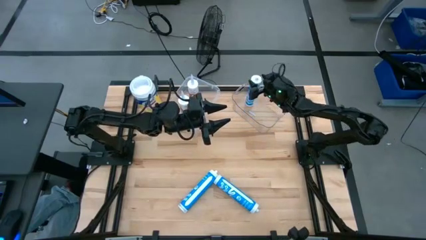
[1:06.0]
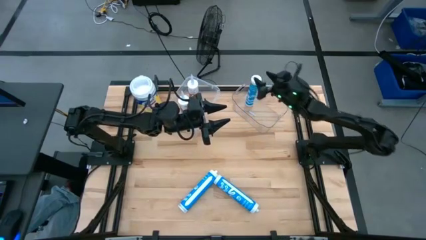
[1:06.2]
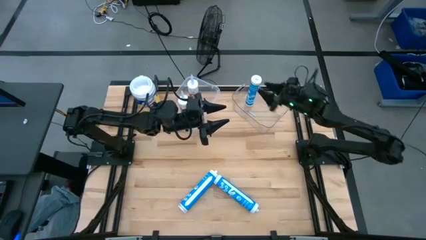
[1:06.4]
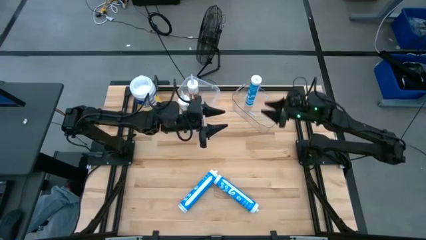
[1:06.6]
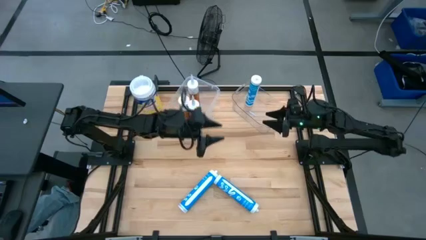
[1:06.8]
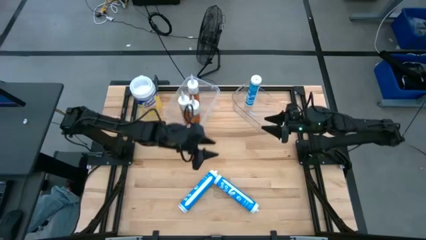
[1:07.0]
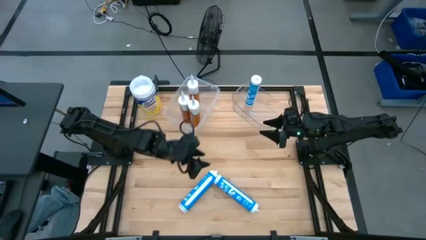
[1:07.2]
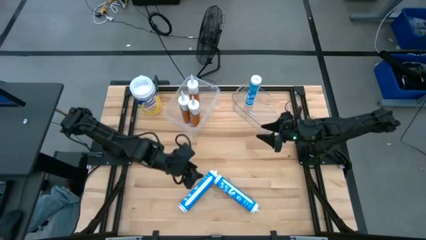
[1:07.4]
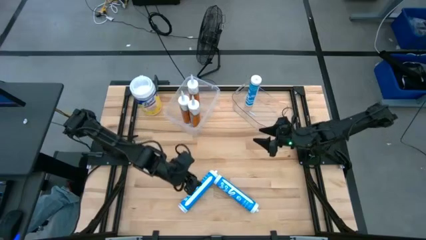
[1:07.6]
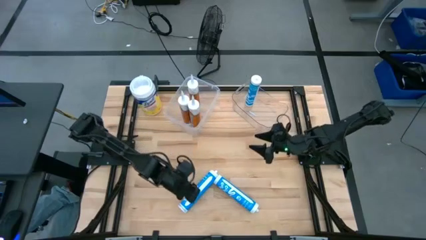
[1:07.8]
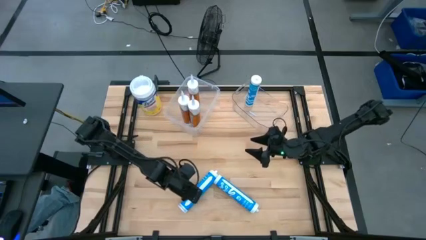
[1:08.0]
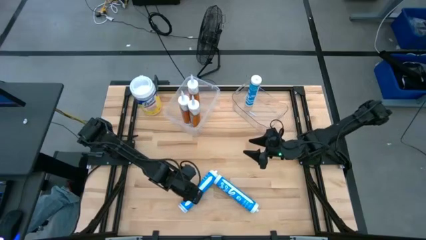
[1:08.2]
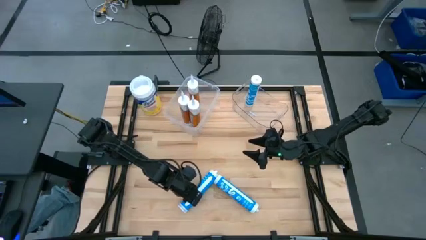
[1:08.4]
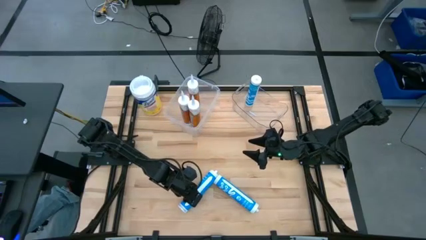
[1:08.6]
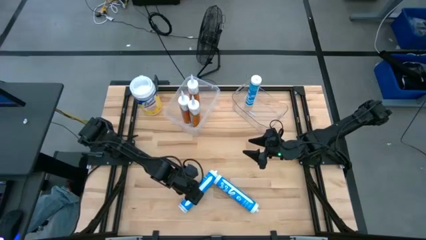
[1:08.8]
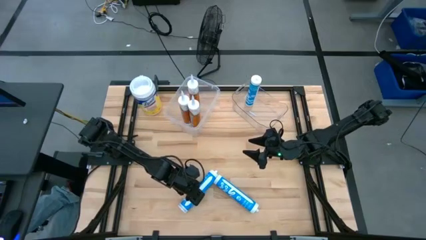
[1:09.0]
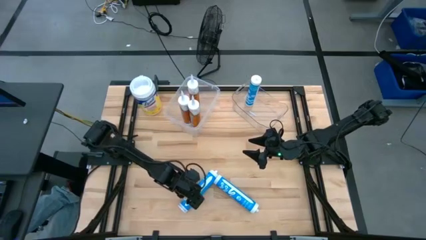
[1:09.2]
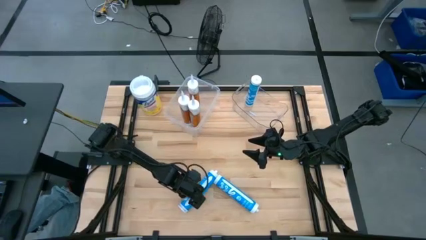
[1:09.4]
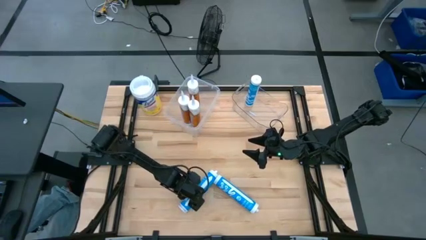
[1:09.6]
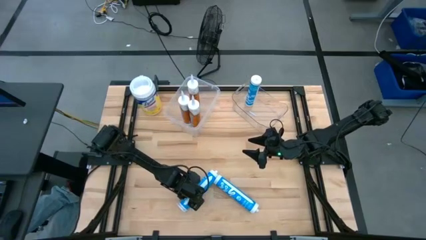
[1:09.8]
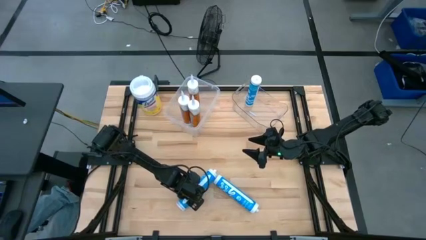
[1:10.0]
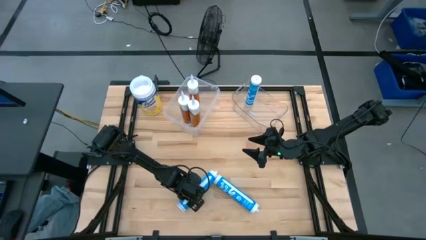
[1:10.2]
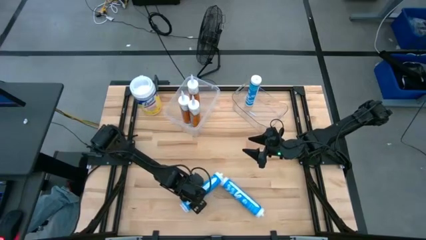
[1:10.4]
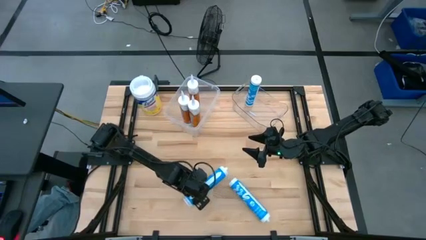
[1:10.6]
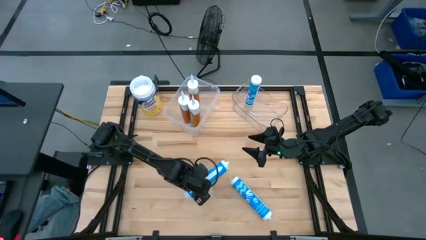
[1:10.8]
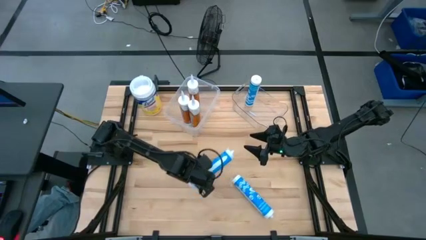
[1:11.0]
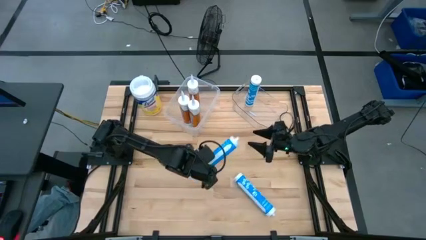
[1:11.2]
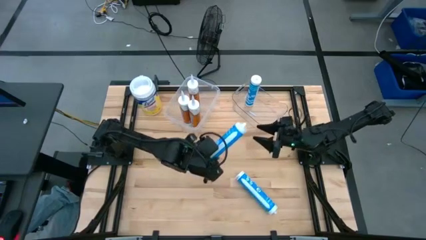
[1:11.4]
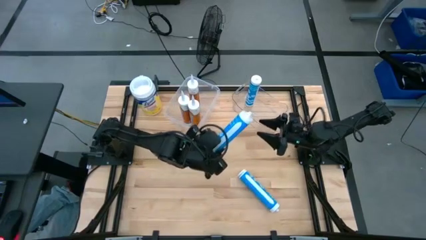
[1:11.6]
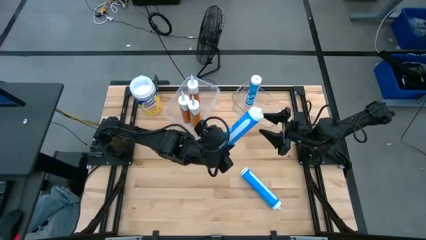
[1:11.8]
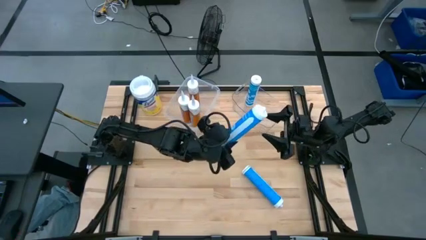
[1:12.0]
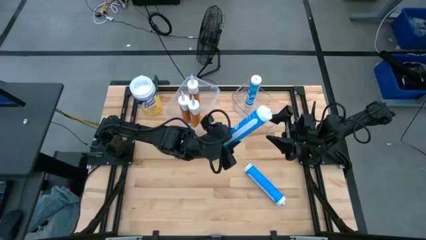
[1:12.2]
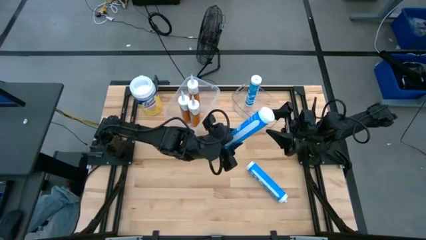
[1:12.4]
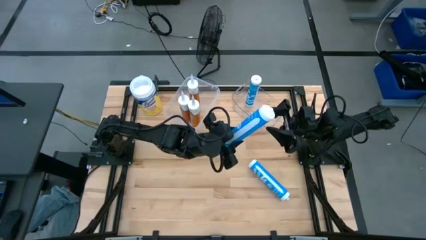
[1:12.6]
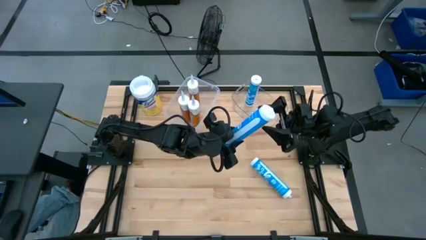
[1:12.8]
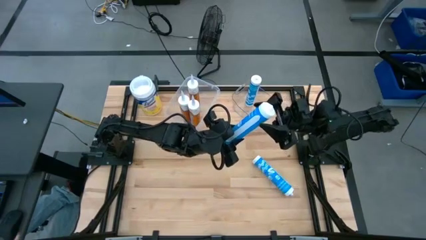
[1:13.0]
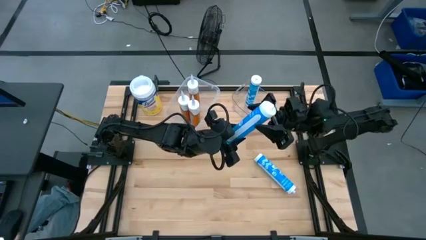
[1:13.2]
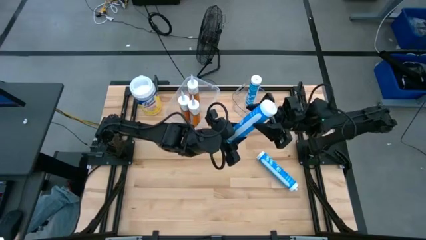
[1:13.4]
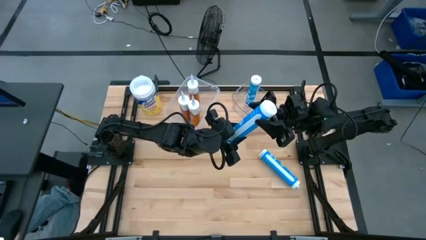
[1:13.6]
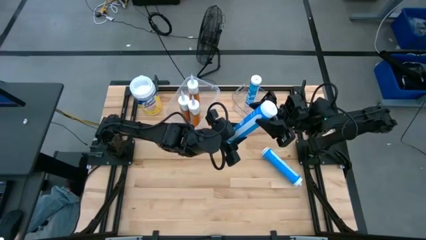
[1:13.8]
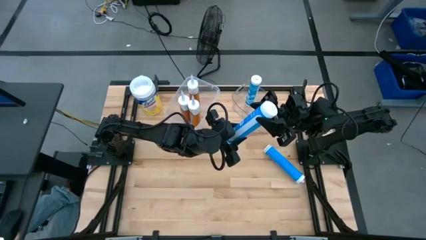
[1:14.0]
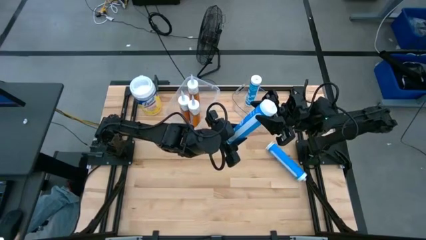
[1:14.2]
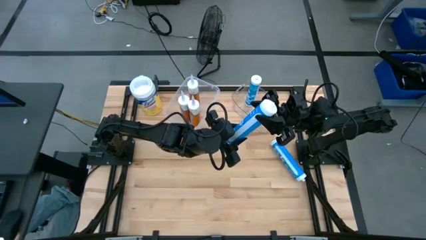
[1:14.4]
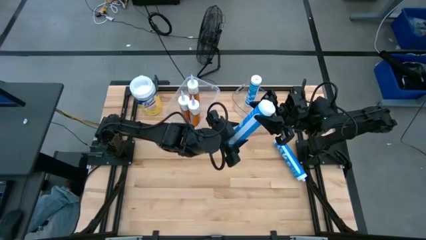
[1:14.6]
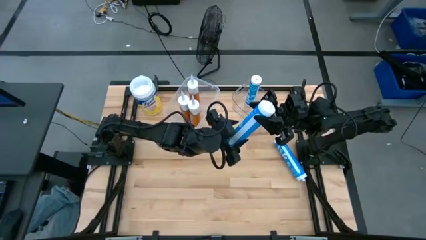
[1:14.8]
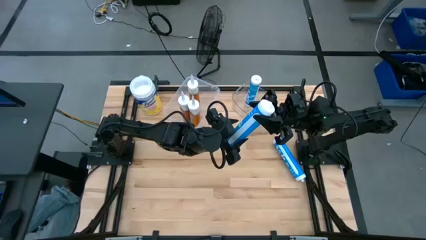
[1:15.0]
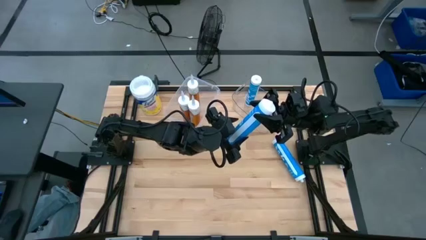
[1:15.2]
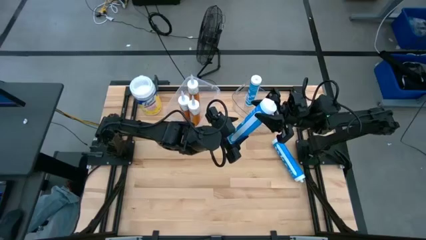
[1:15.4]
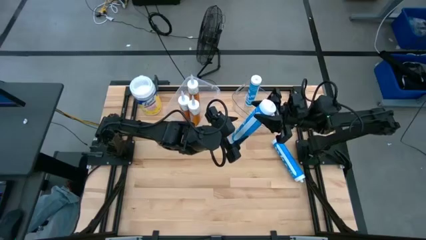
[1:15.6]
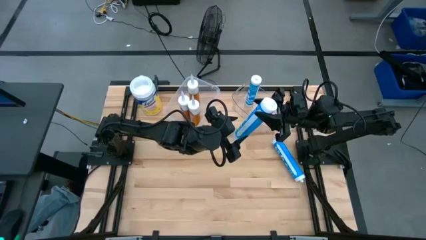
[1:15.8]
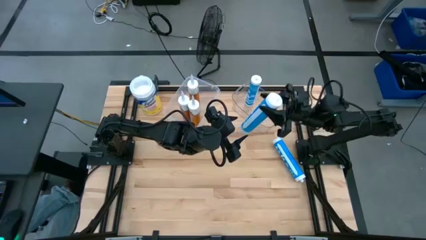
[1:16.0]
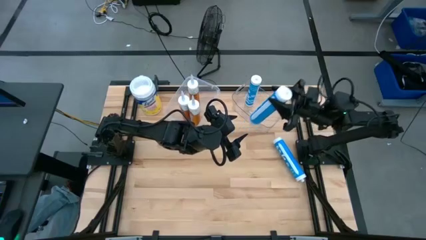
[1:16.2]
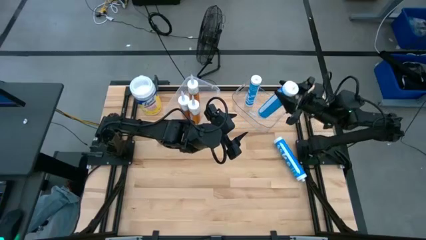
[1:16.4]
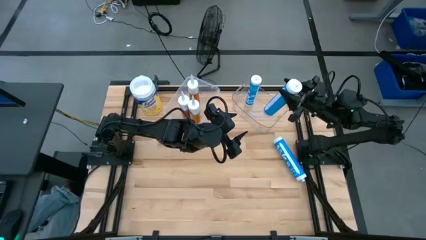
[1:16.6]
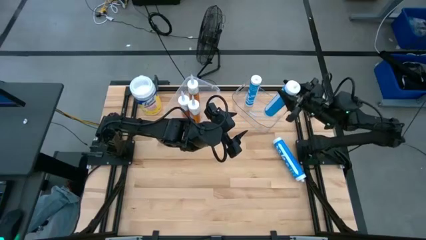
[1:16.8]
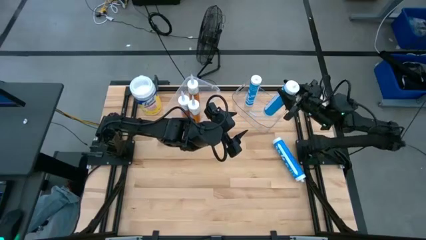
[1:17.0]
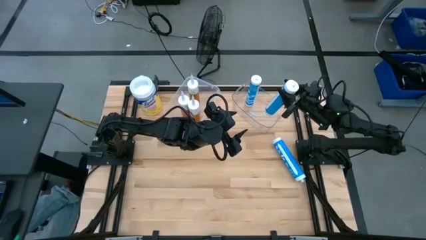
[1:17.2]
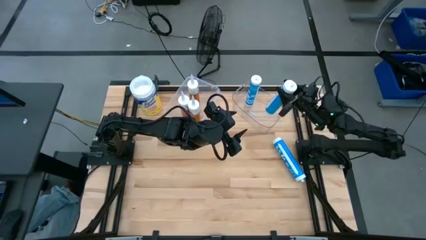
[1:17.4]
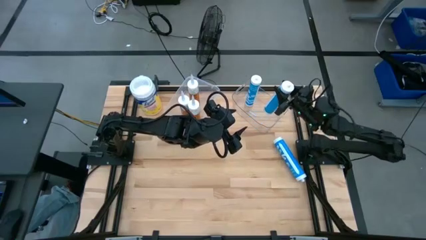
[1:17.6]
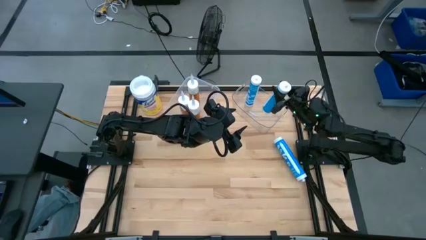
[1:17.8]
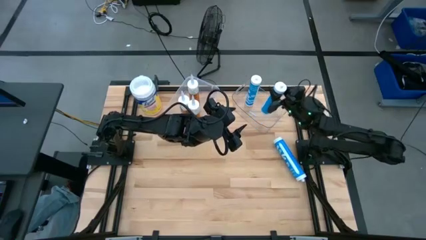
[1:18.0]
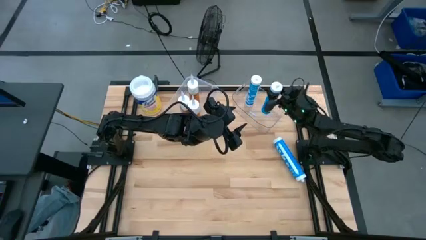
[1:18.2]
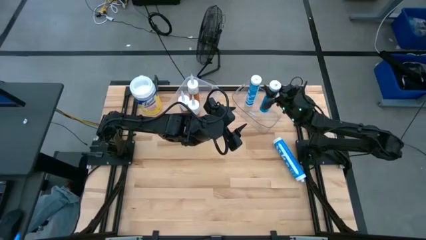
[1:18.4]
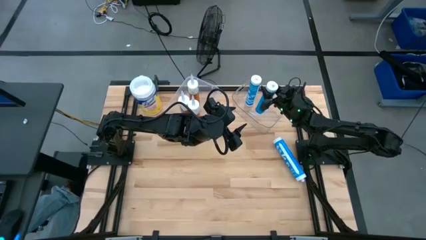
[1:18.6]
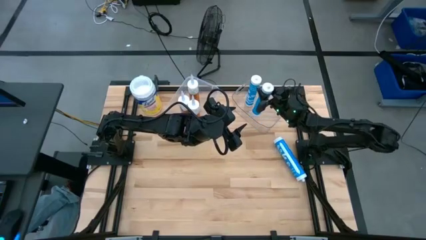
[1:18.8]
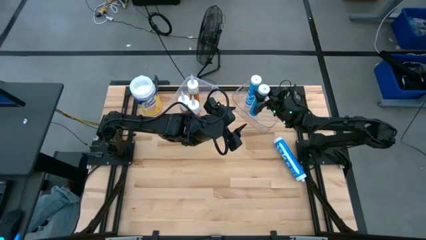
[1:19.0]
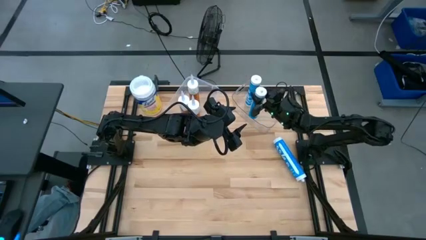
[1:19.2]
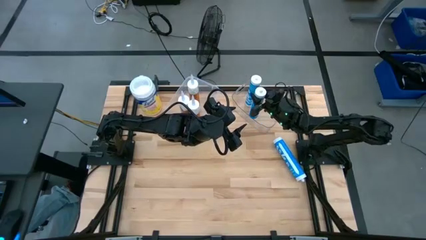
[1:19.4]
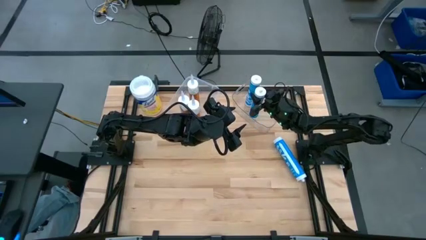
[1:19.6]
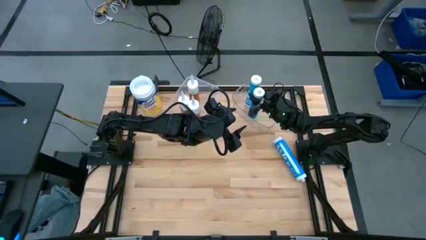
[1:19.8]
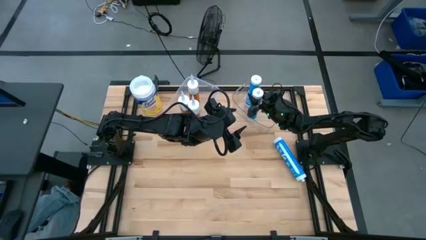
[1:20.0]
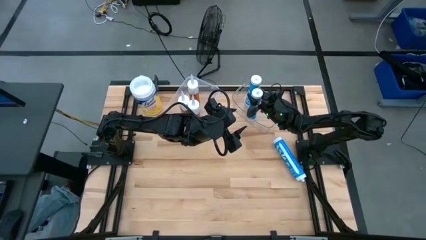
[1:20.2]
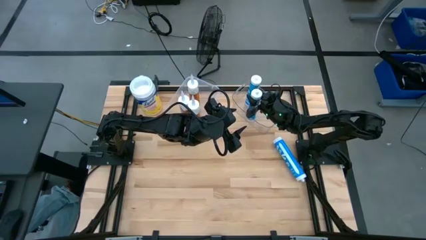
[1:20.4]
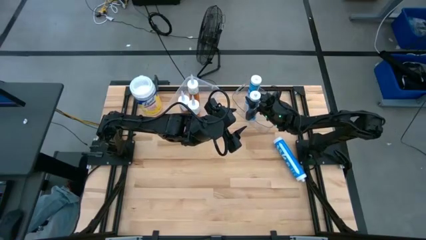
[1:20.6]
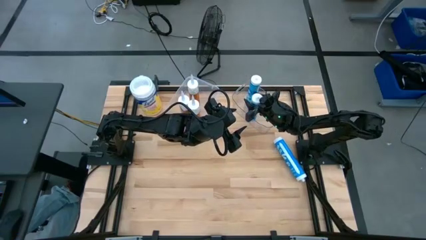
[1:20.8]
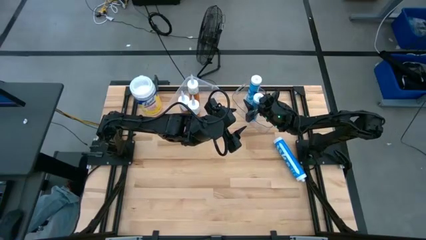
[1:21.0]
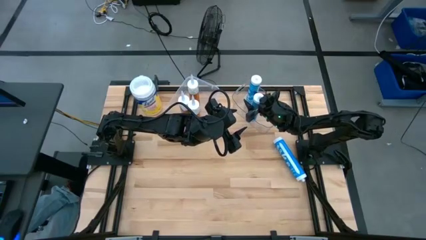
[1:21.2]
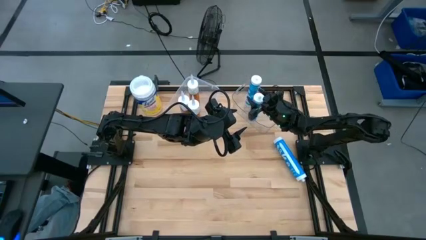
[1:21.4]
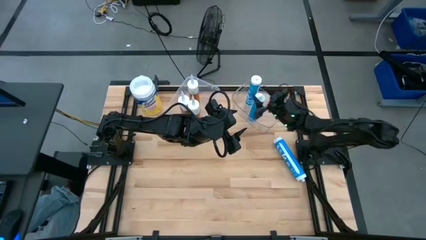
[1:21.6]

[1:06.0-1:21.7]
Task: Pick & place silicon tubes, Sealant and Lysol wipes
Put the left blue sealant into the right transparent bin
